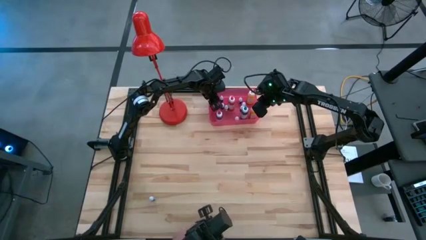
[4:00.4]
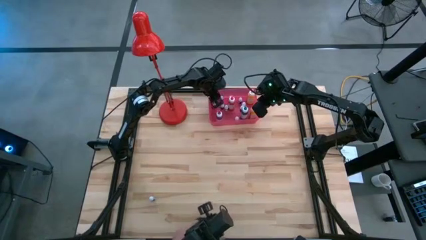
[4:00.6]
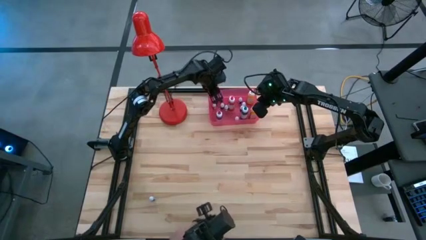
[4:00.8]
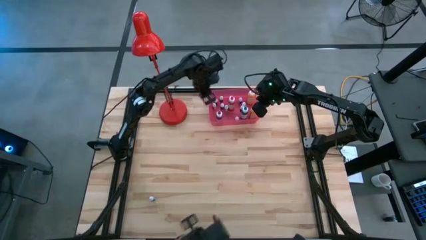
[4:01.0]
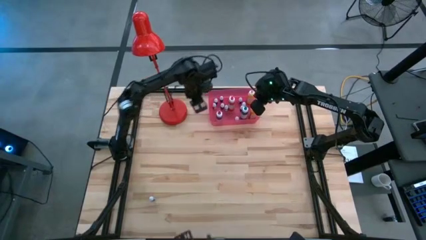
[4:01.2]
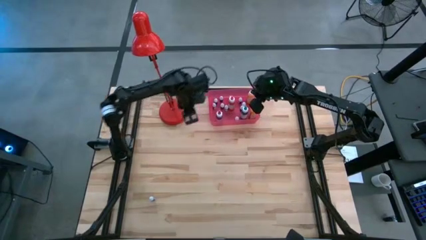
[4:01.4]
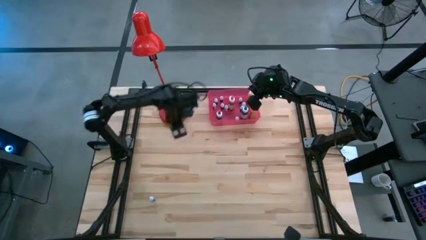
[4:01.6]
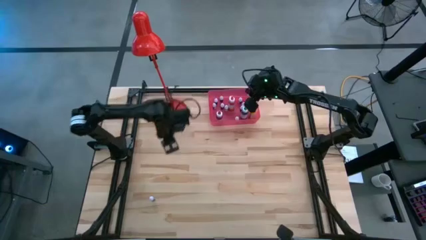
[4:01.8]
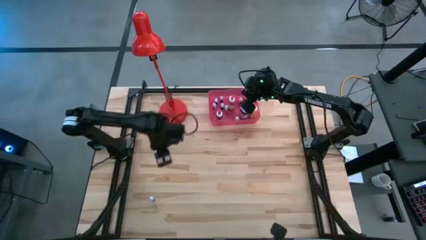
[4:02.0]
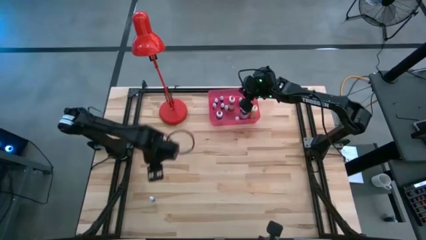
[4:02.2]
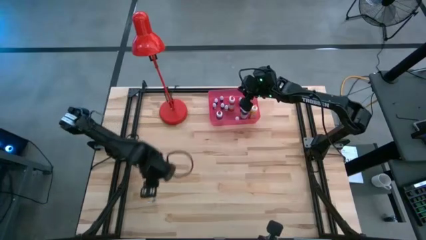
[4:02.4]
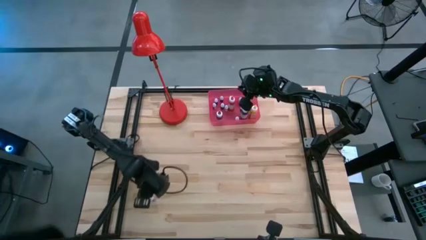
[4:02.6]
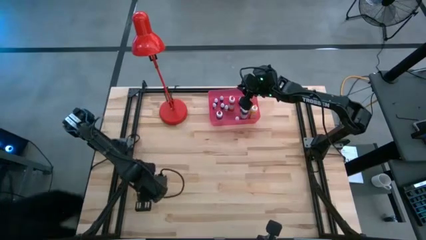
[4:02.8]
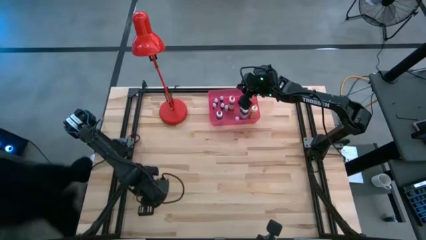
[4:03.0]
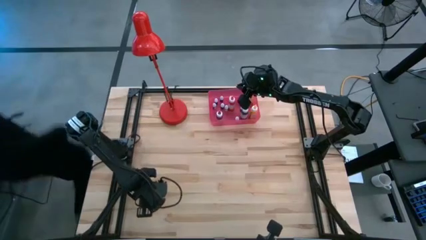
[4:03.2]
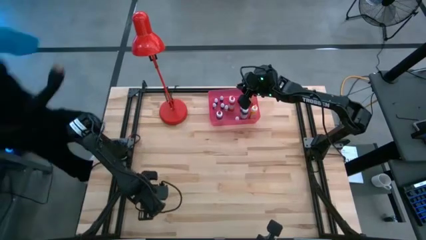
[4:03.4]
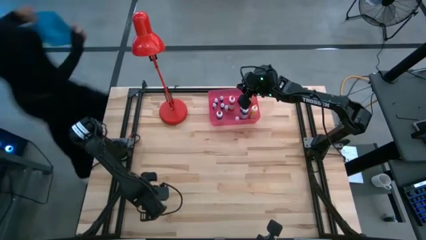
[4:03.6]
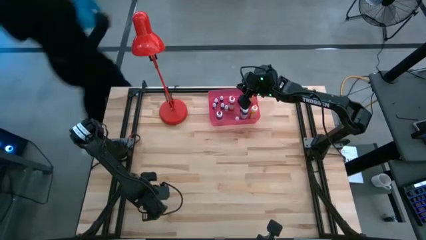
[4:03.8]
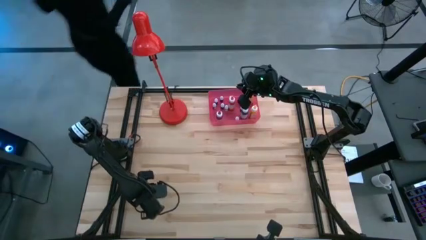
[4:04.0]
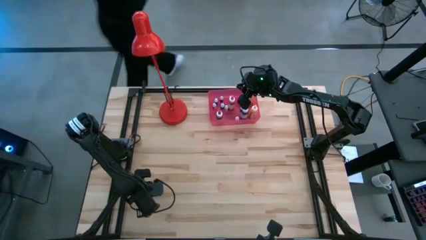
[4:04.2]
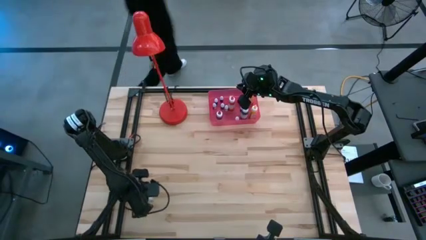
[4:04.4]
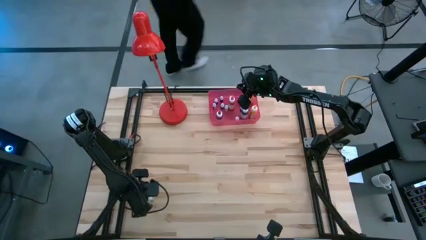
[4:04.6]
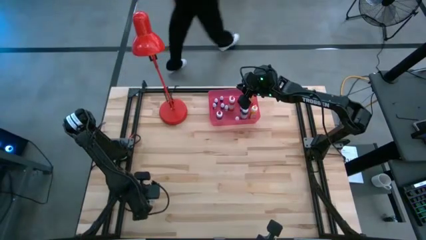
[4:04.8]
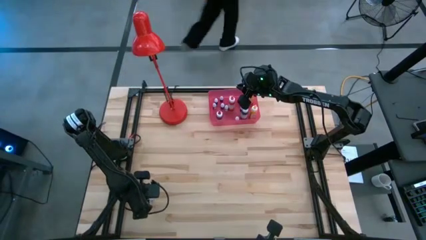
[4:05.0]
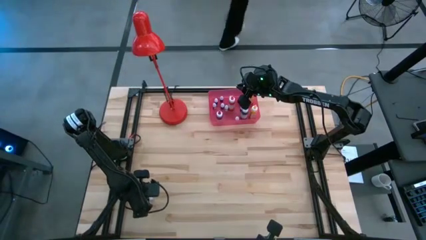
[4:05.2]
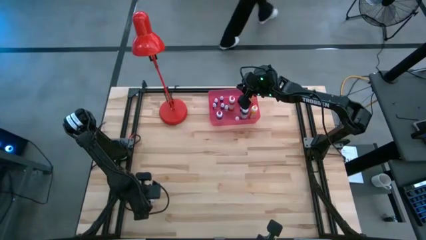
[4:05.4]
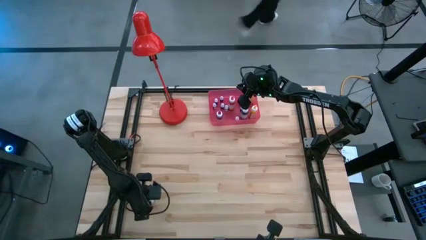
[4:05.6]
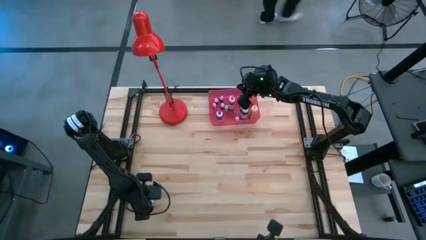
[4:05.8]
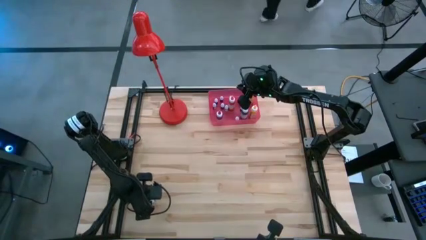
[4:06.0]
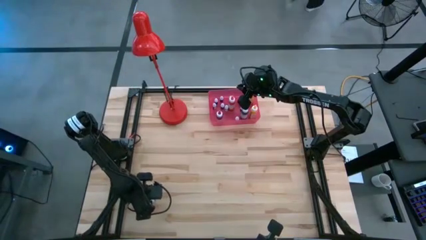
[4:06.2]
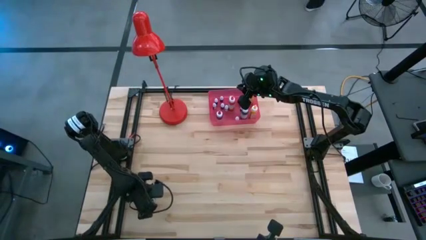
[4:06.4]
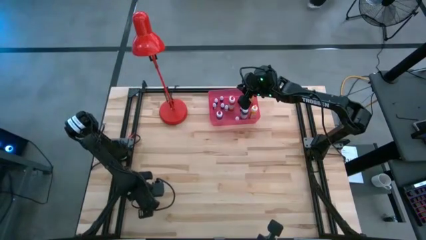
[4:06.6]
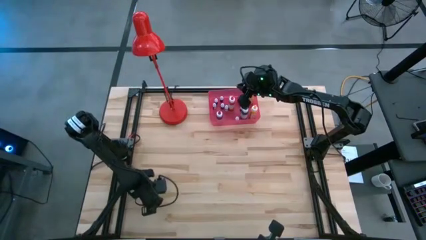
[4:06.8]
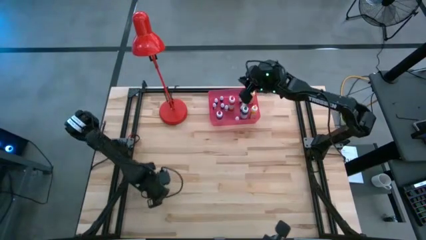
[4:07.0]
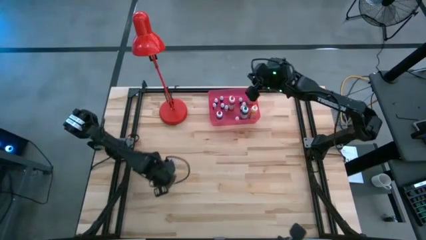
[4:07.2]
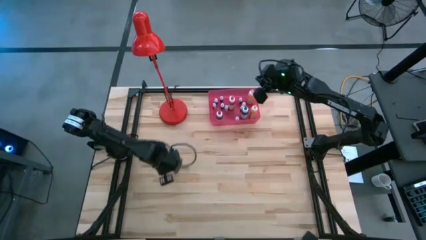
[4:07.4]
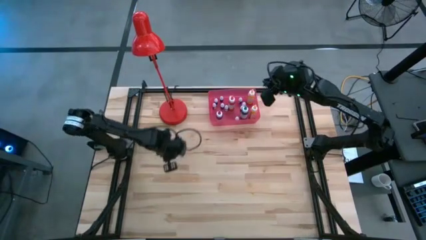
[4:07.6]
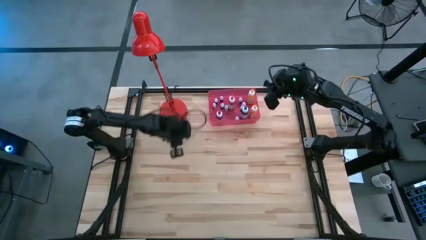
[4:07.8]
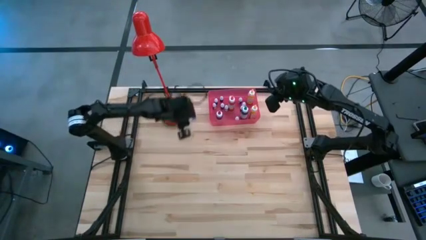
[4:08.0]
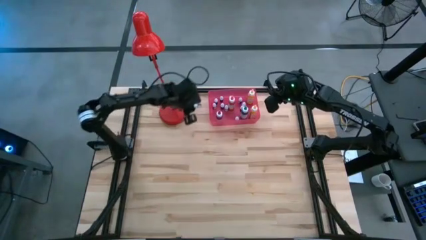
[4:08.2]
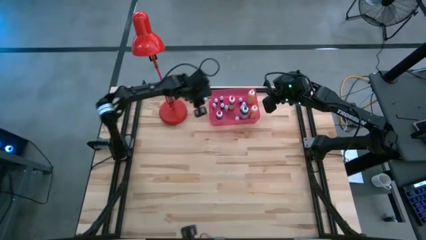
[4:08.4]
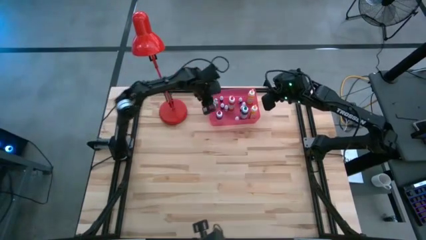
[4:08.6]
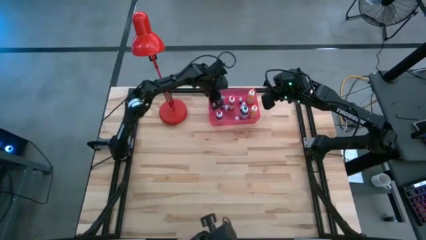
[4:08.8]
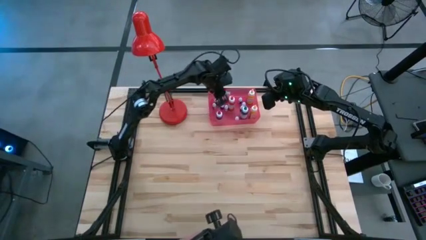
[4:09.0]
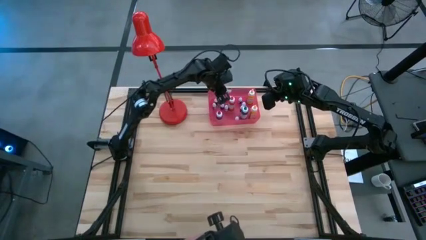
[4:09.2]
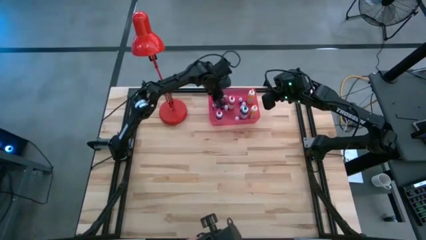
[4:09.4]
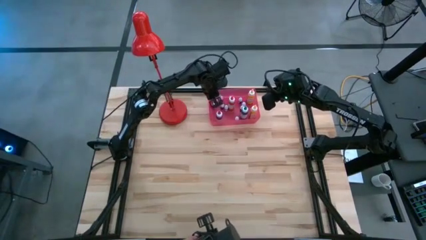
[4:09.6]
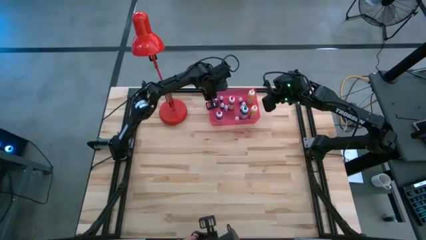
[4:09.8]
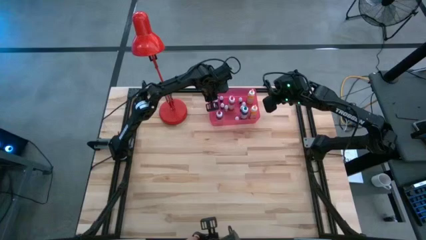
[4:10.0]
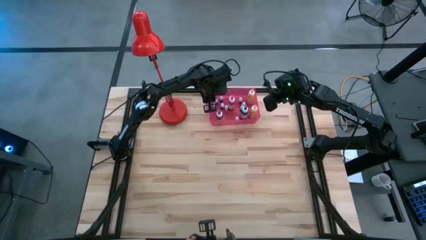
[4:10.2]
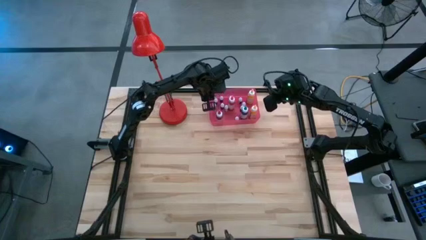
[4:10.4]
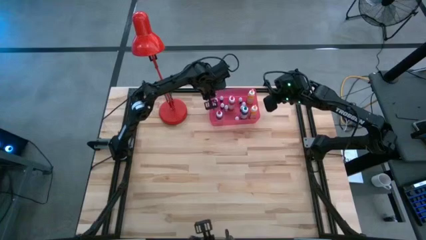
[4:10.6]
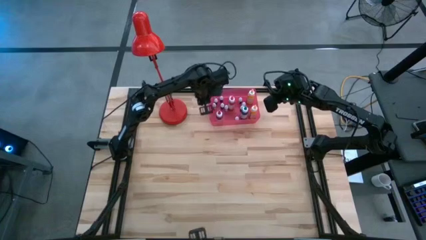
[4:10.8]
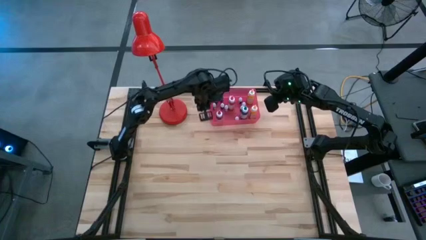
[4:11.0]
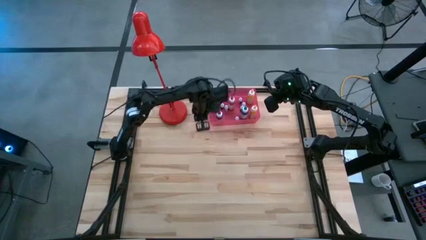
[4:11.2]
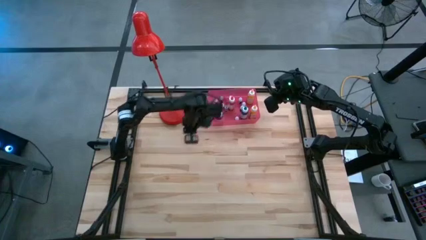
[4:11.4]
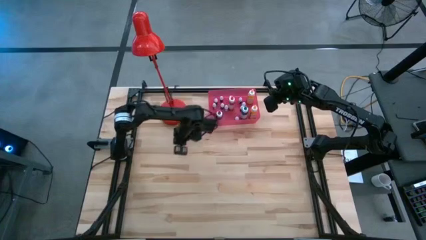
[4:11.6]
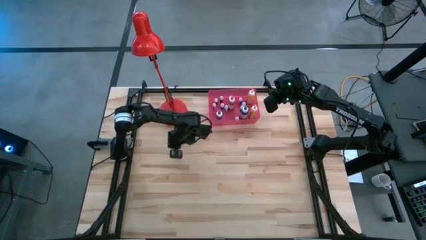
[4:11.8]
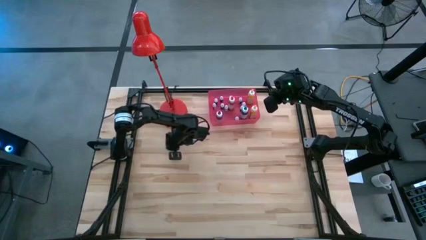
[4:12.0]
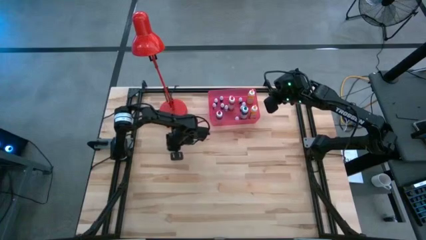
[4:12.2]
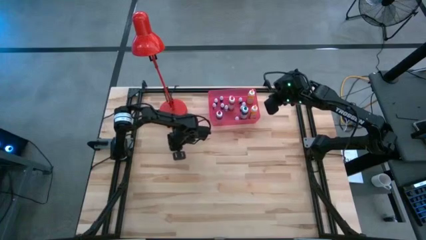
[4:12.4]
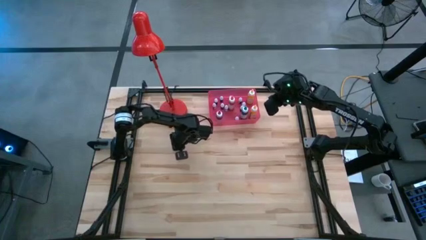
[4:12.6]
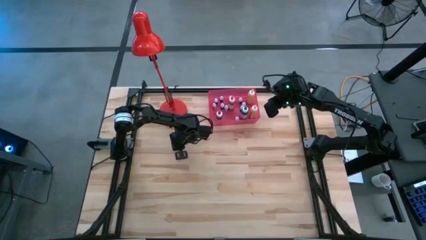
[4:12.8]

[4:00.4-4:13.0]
Task: Pick & Place food coloring
Put the small blue food coloring bottle into the red bin

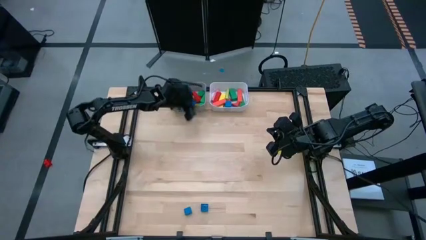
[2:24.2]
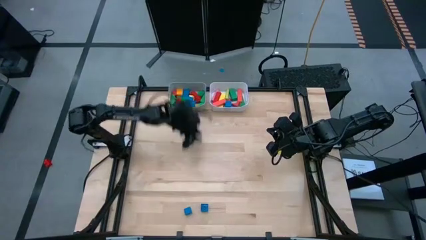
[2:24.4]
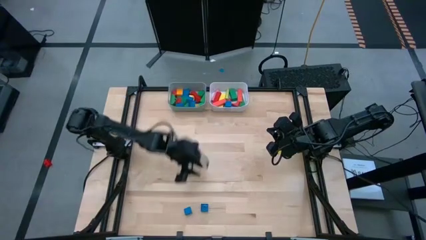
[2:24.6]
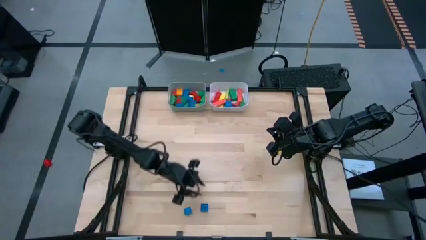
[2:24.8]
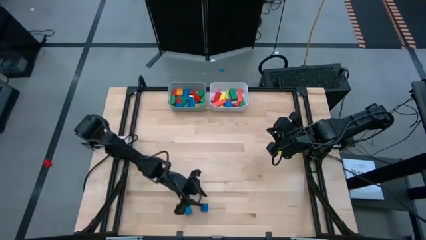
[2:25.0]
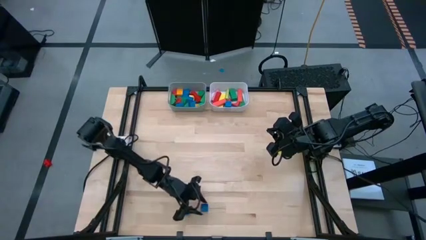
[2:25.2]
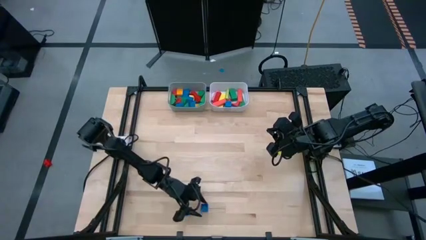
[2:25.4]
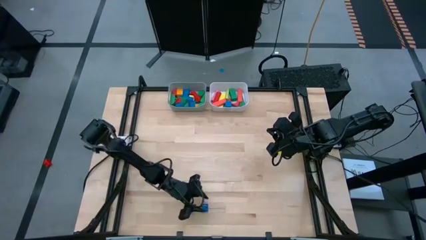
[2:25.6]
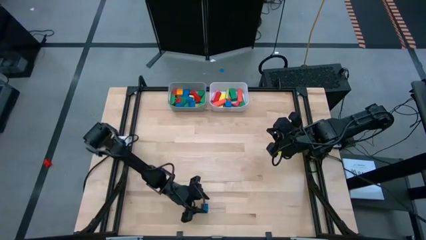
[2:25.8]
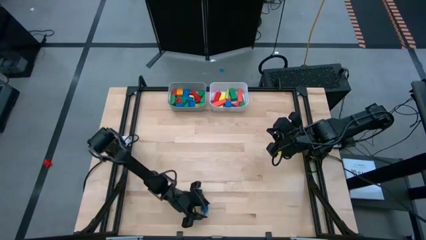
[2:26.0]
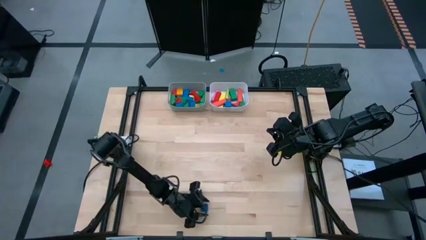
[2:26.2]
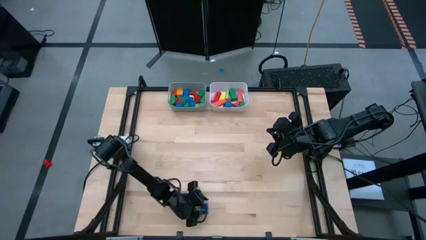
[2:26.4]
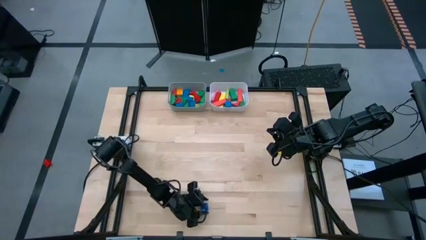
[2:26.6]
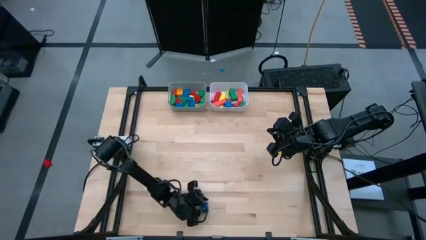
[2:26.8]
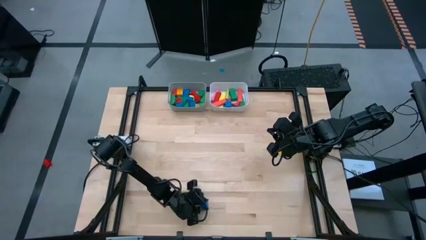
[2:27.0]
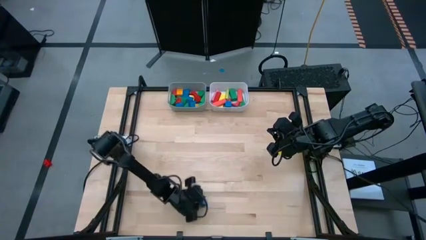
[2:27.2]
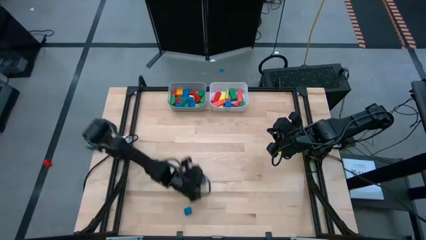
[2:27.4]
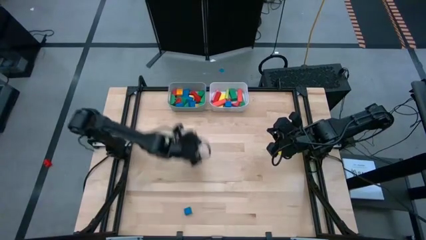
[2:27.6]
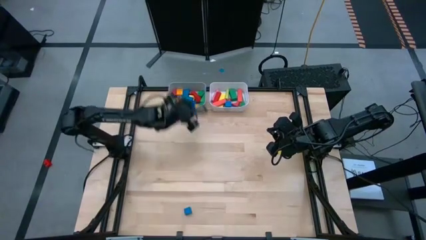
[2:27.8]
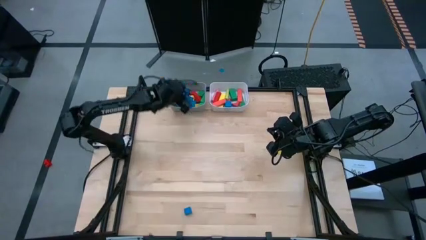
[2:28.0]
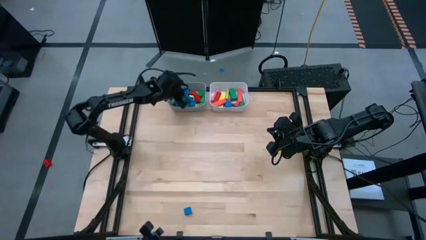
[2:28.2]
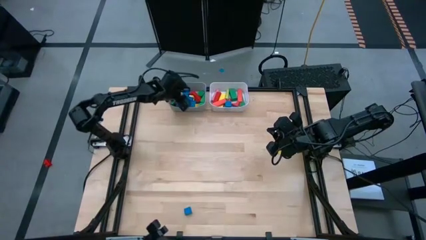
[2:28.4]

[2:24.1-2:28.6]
Task: Sort blocks by size
Put the blue 4-stud game piece into the gray bin
